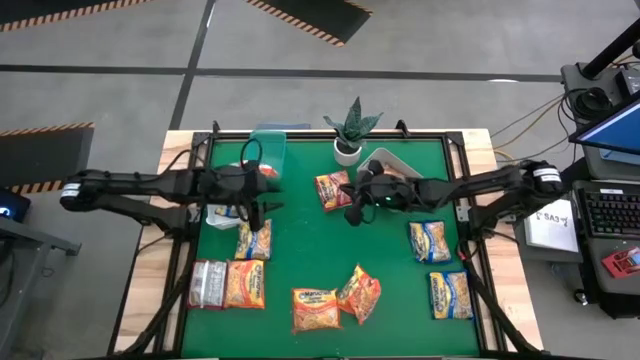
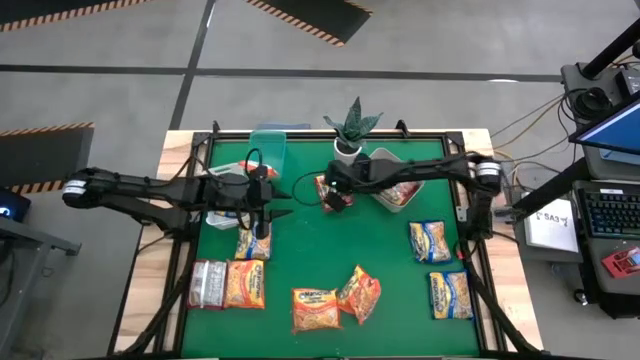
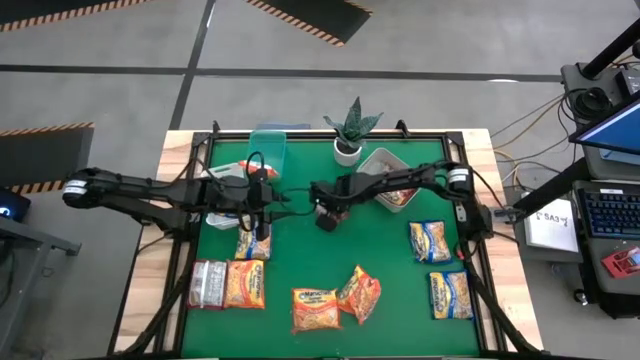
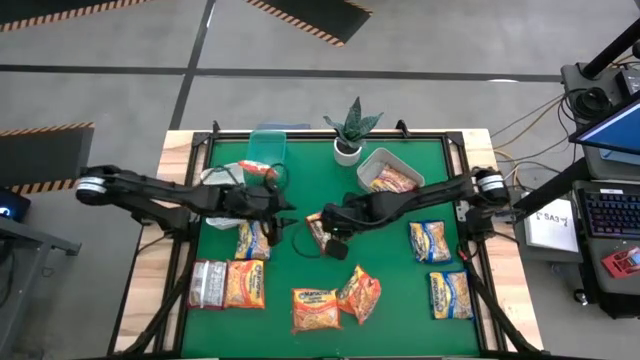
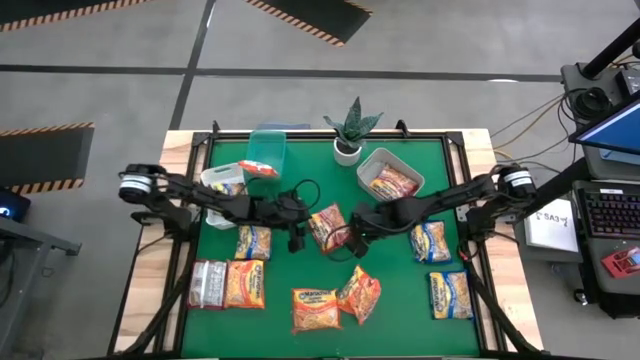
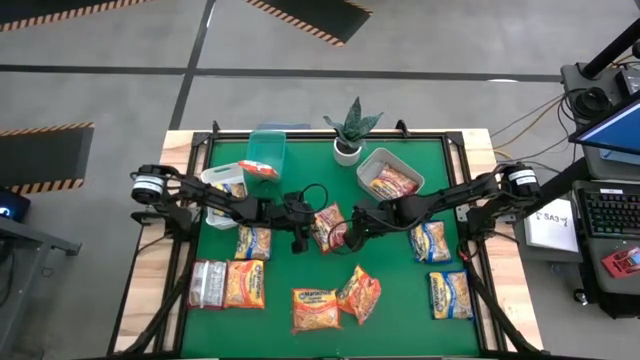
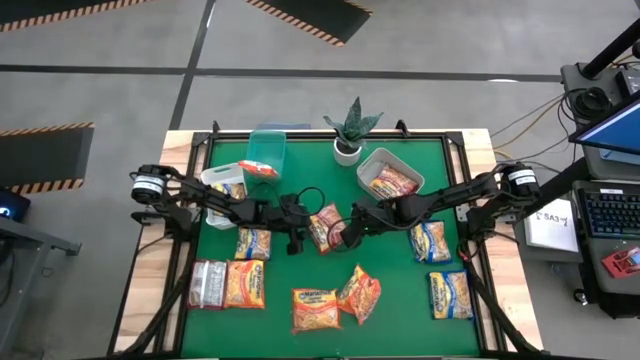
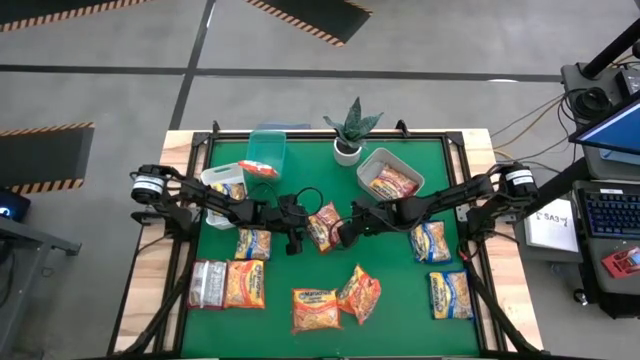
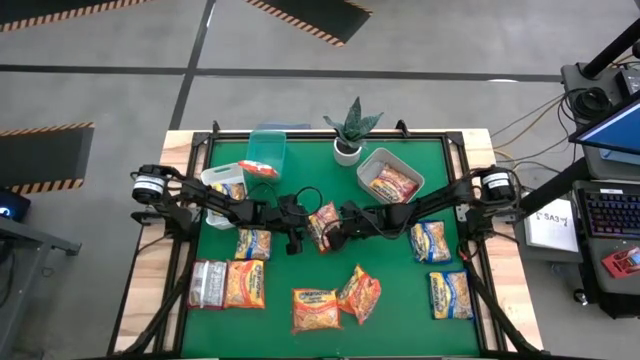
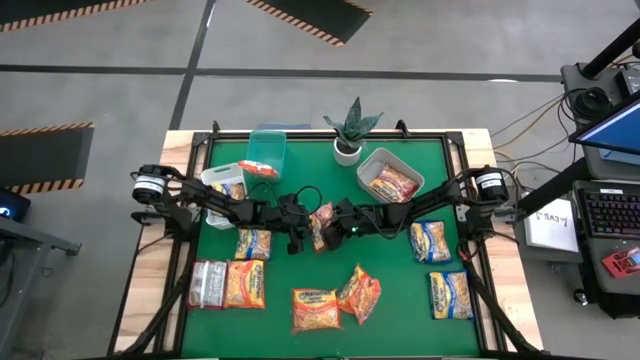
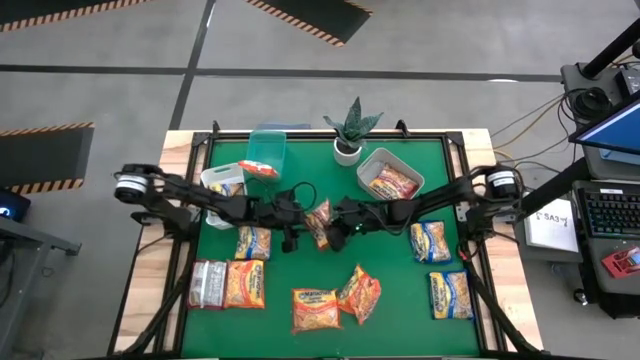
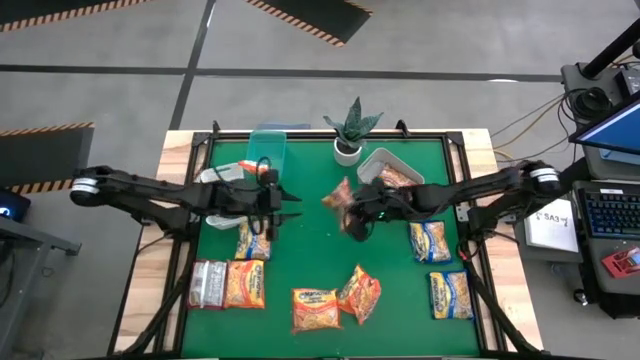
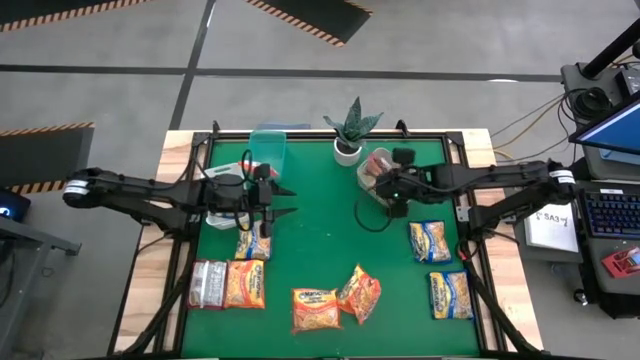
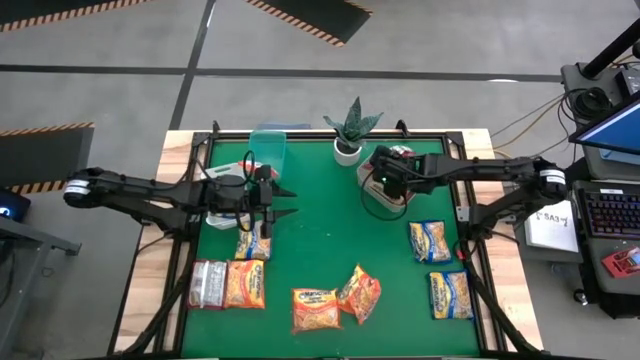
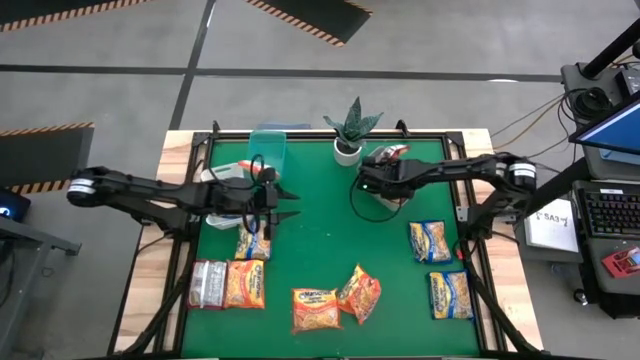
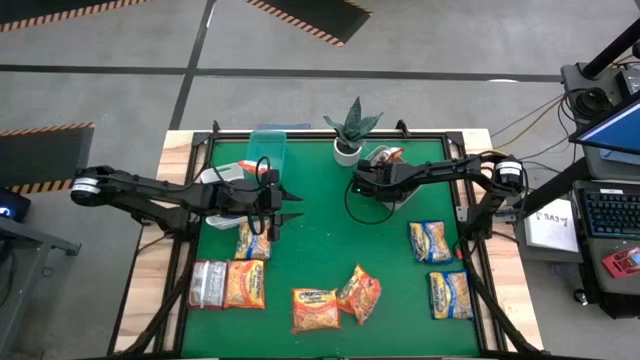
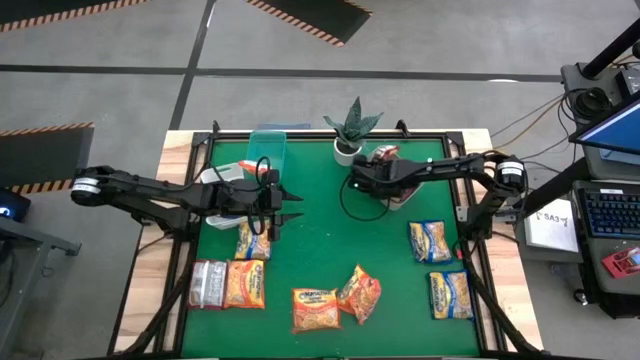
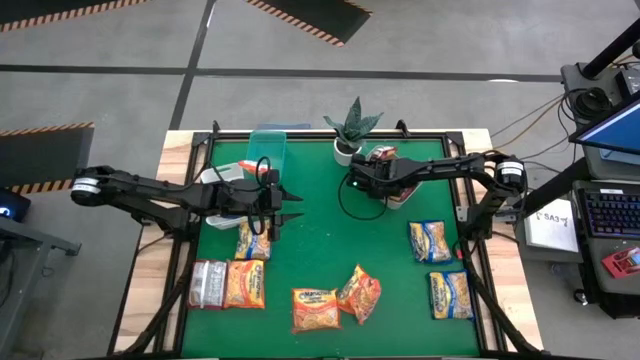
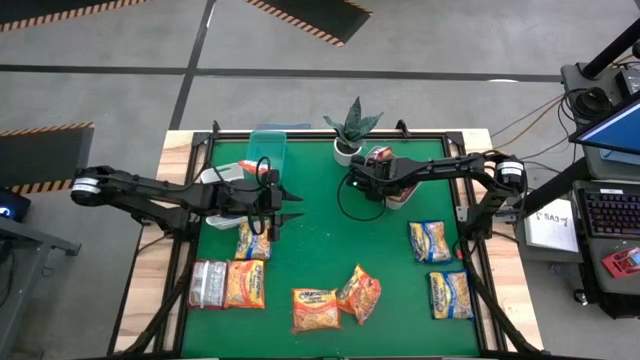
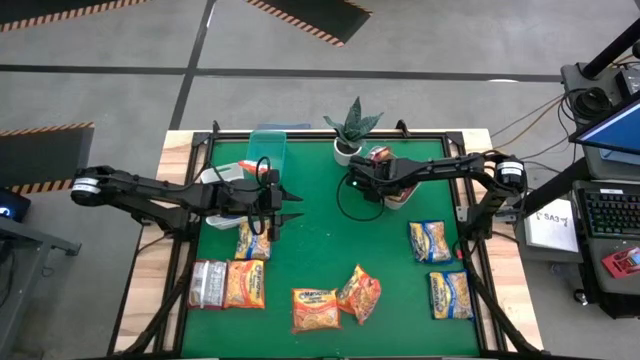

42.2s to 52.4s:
Task: Sort Maruchan noodles
Put the top red noodle pack into the gray bin

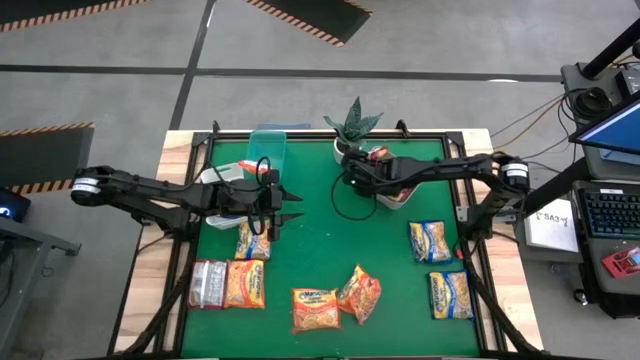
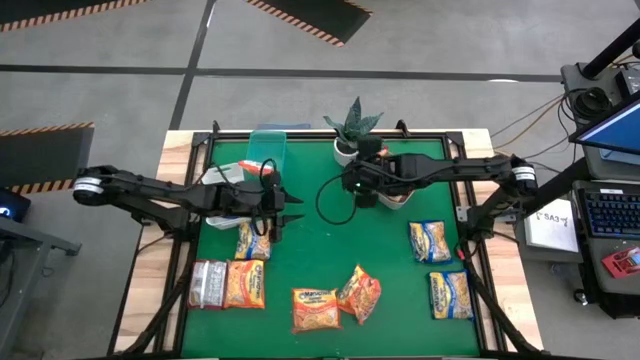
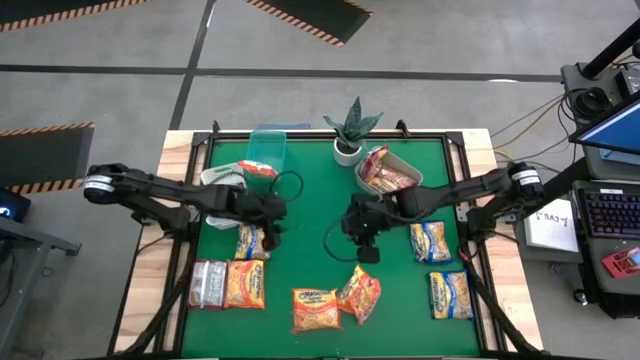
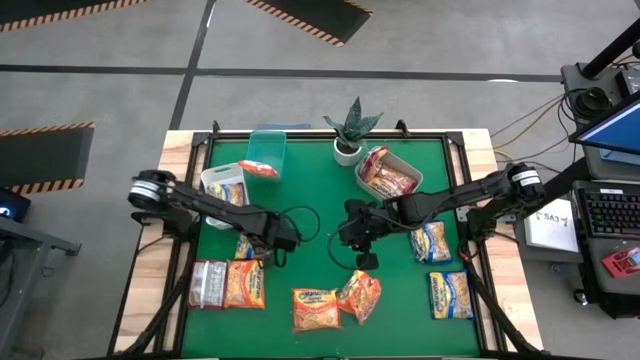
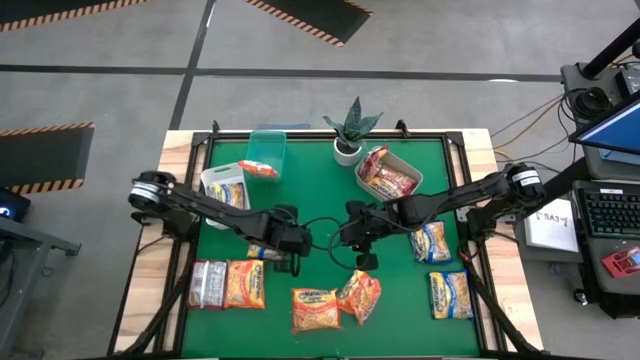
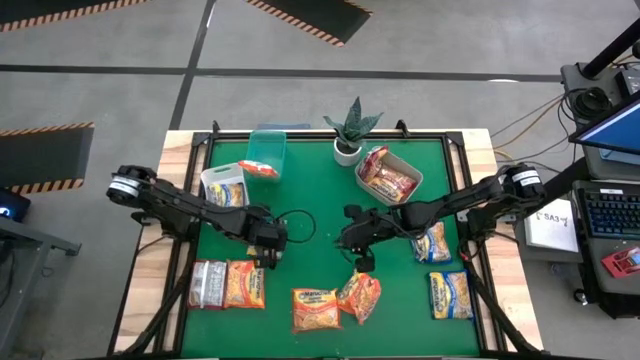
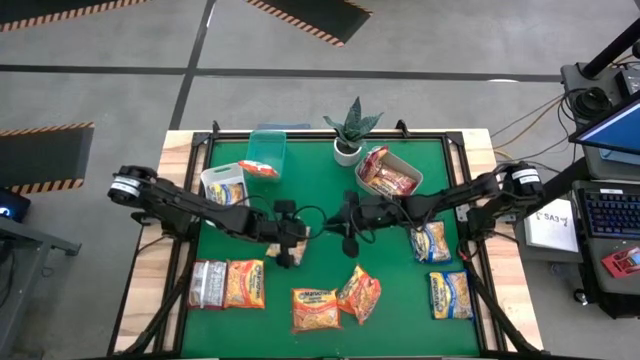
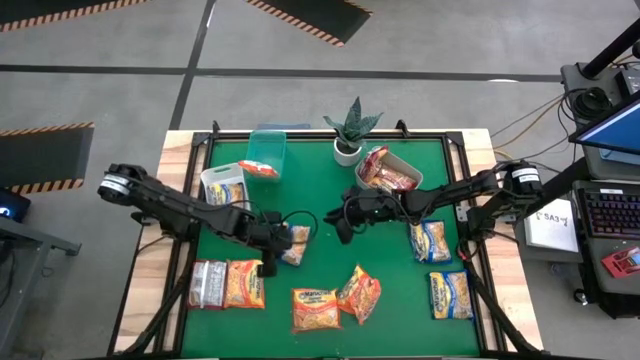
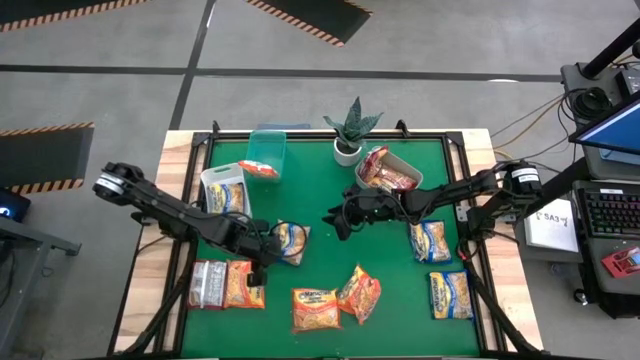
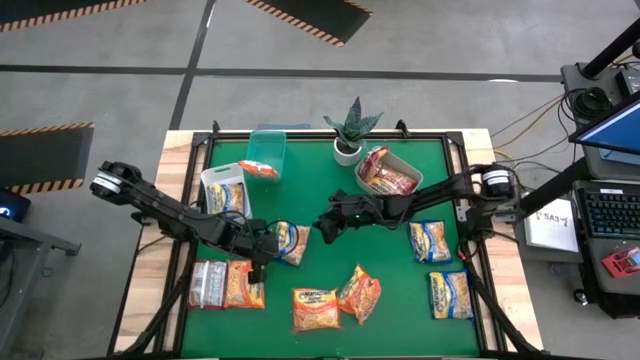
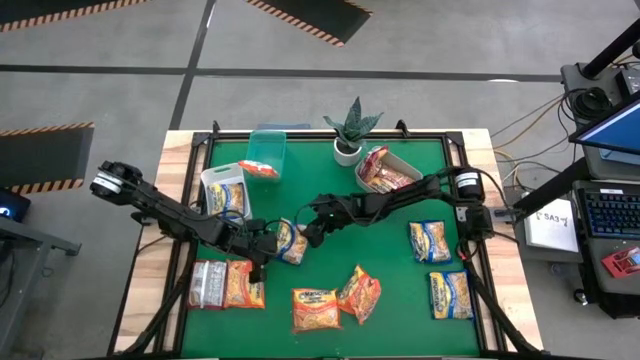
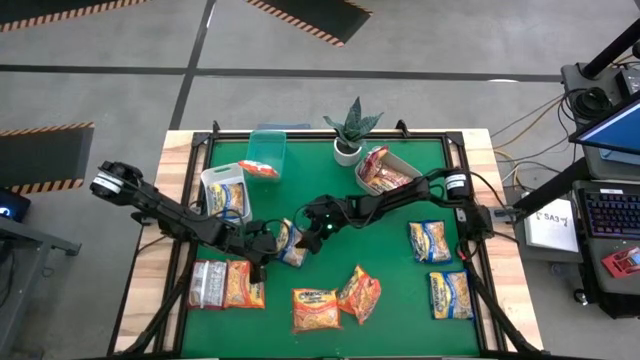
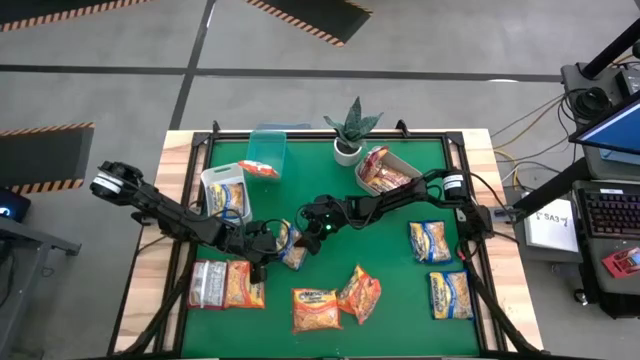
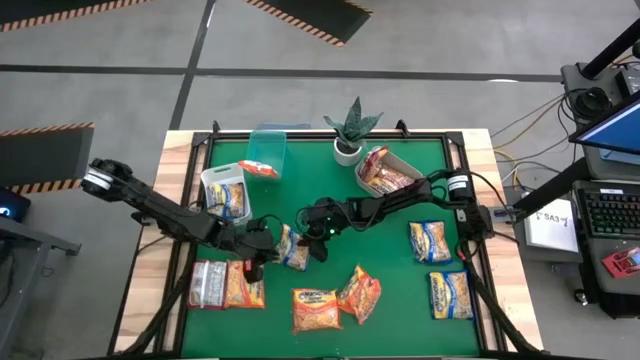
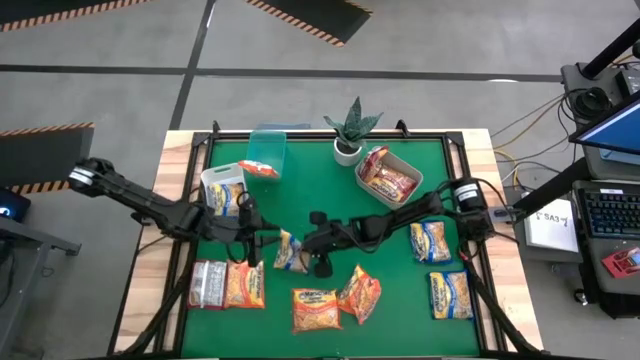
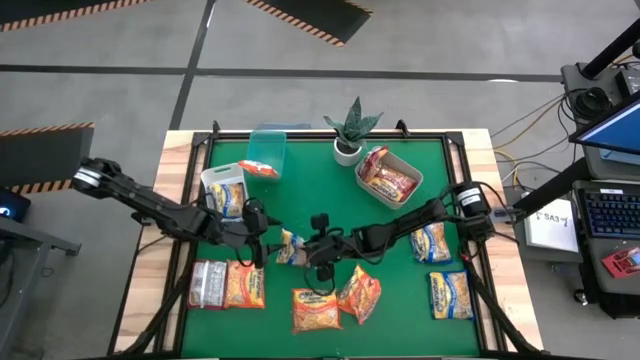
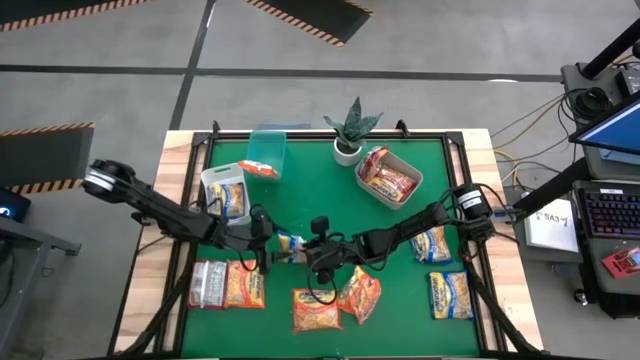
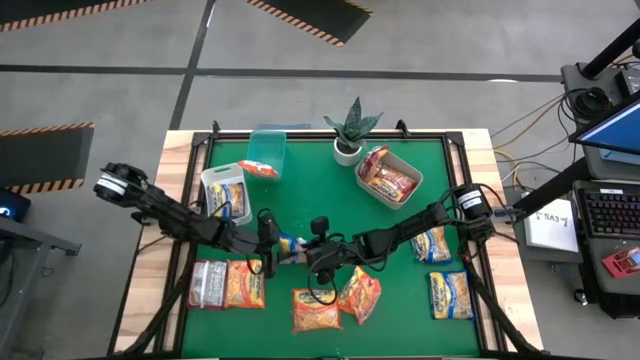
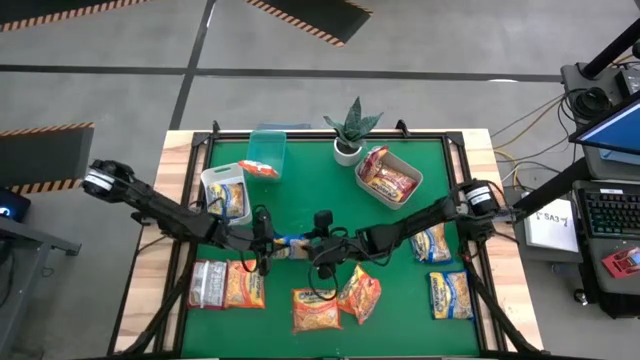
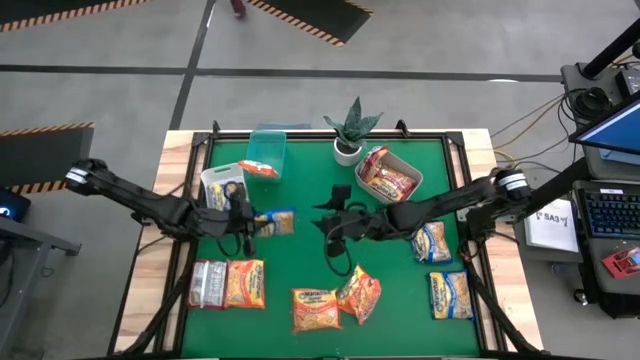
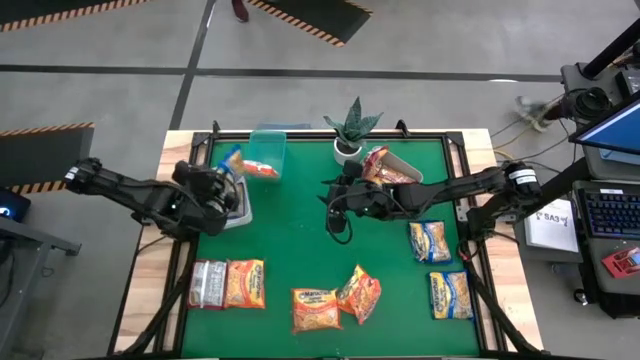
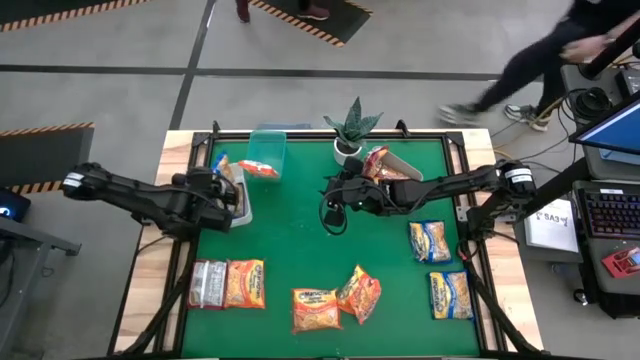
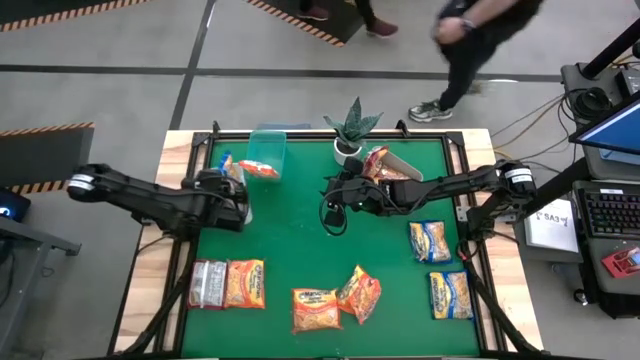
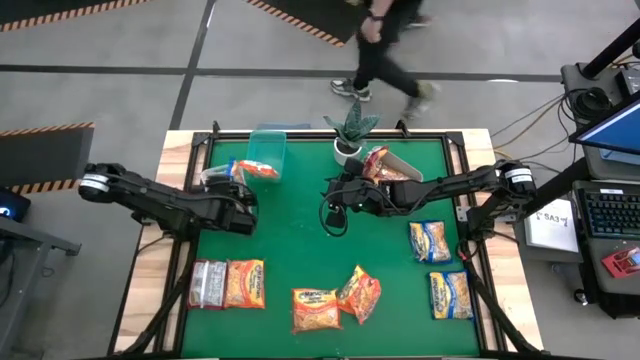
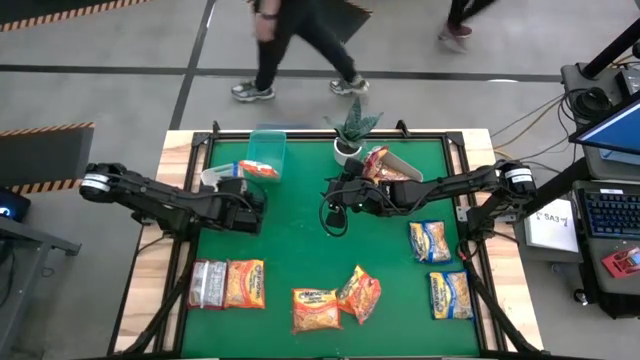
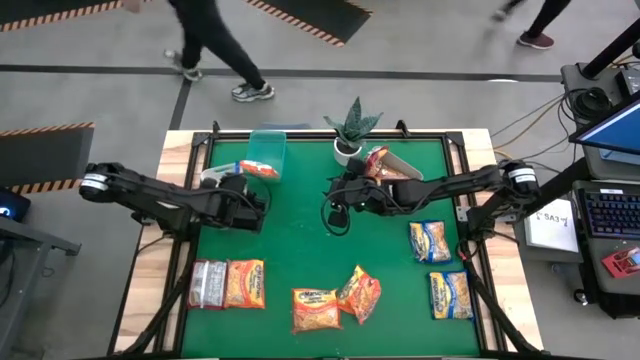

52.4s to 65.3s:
Put the blue noodle pack into the white bin
